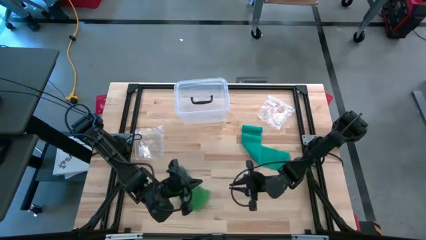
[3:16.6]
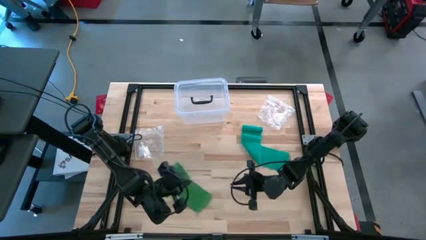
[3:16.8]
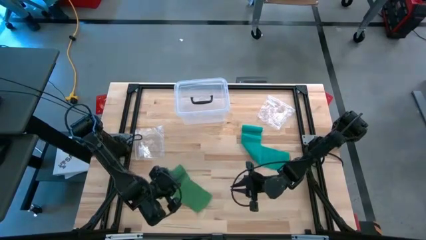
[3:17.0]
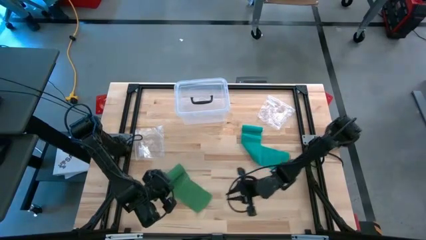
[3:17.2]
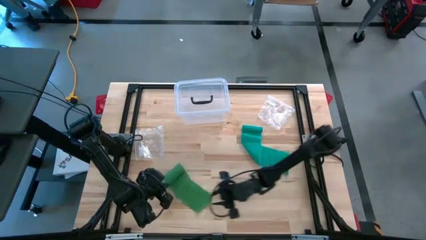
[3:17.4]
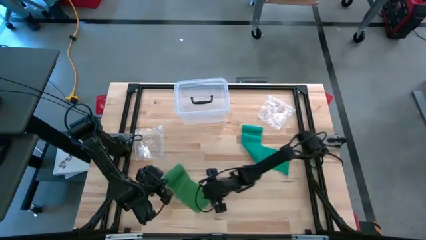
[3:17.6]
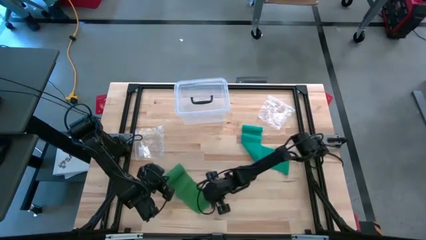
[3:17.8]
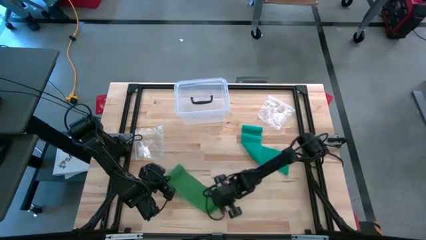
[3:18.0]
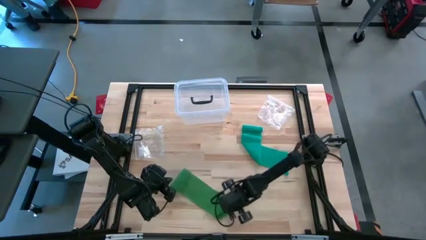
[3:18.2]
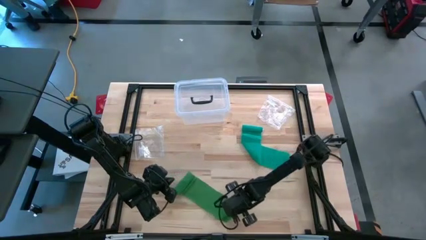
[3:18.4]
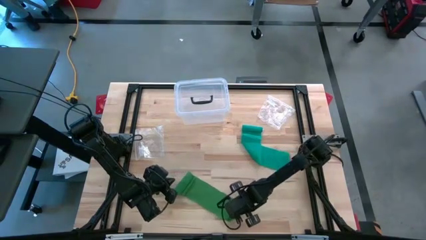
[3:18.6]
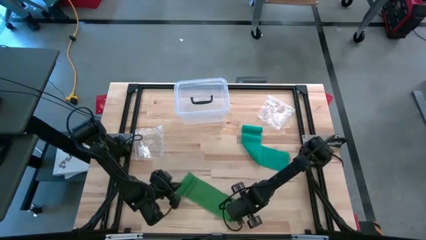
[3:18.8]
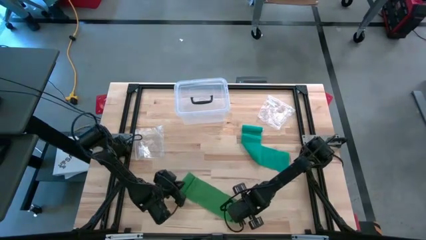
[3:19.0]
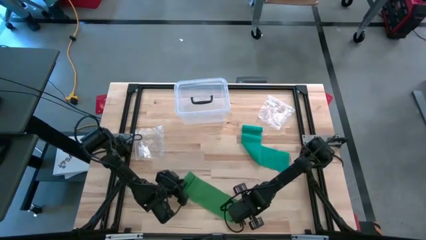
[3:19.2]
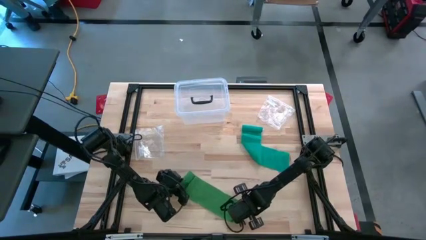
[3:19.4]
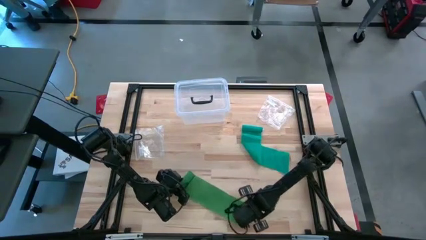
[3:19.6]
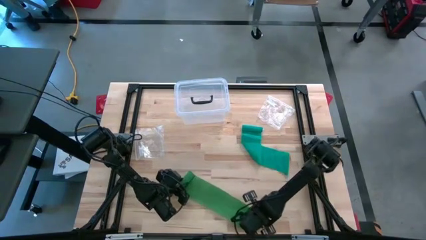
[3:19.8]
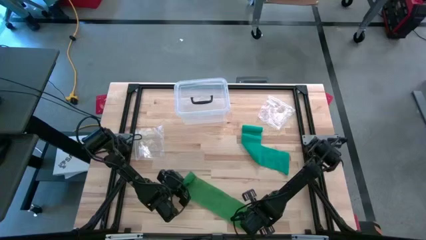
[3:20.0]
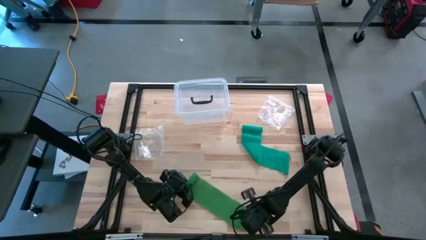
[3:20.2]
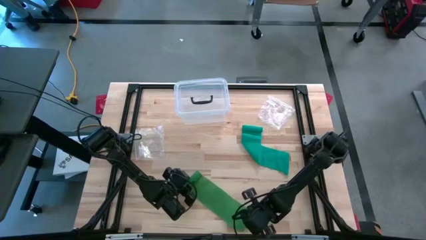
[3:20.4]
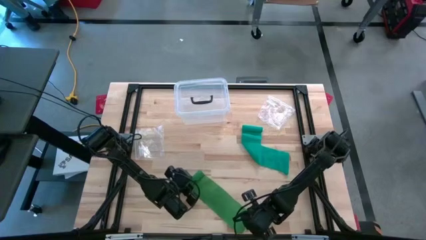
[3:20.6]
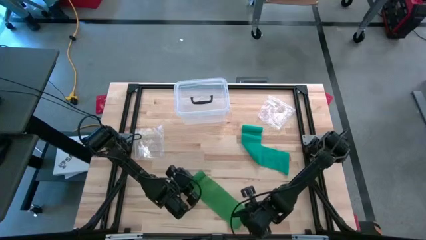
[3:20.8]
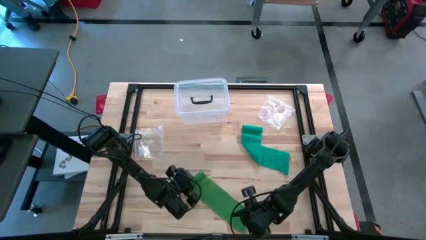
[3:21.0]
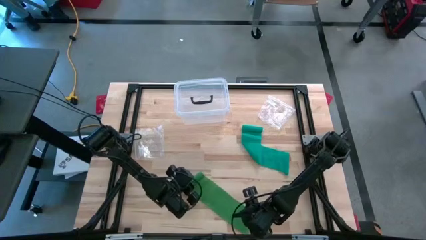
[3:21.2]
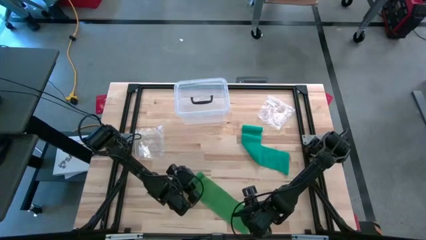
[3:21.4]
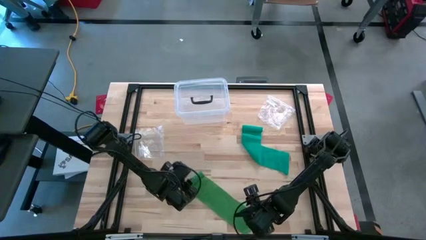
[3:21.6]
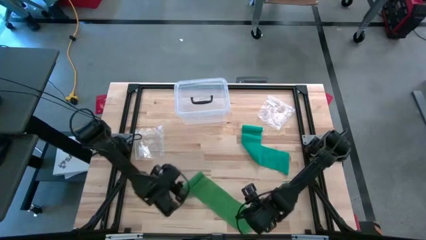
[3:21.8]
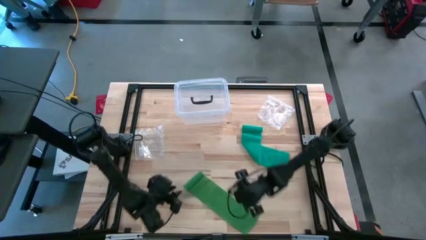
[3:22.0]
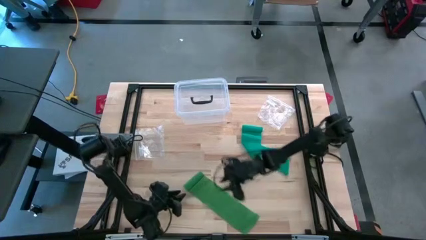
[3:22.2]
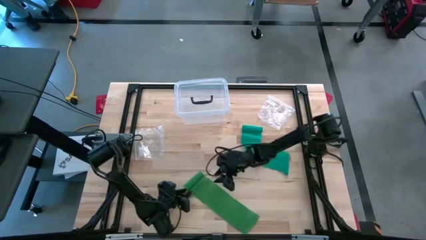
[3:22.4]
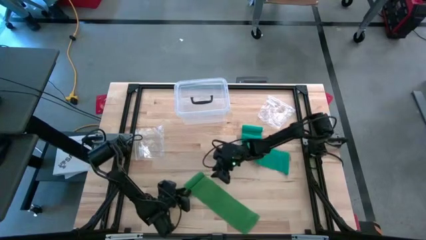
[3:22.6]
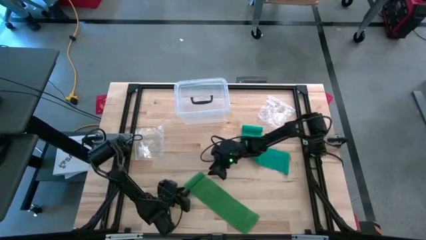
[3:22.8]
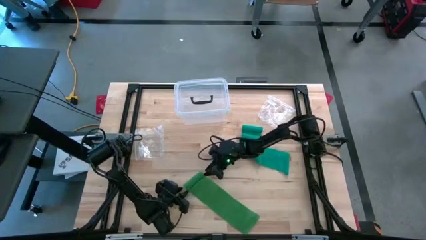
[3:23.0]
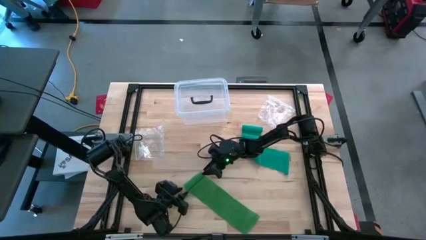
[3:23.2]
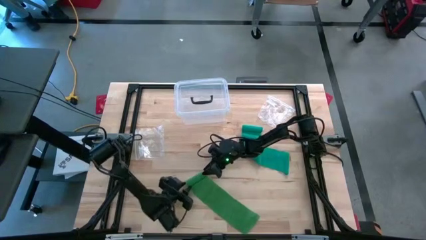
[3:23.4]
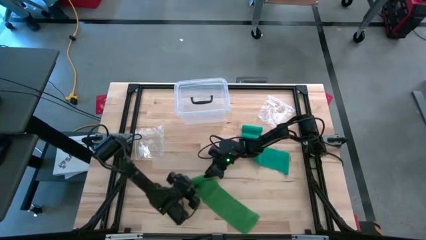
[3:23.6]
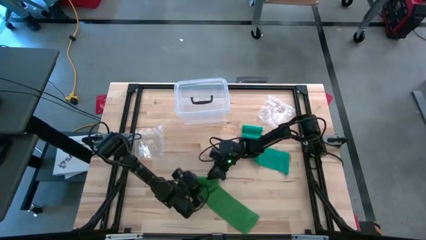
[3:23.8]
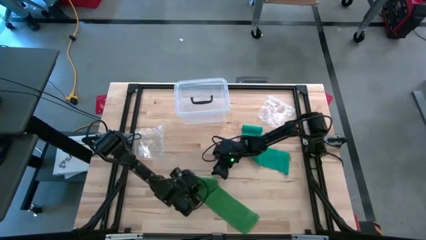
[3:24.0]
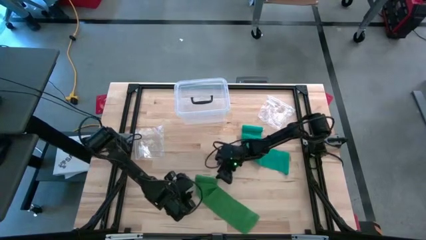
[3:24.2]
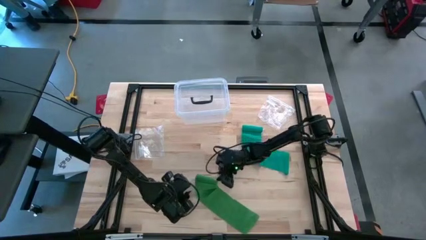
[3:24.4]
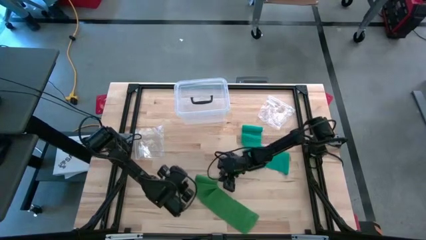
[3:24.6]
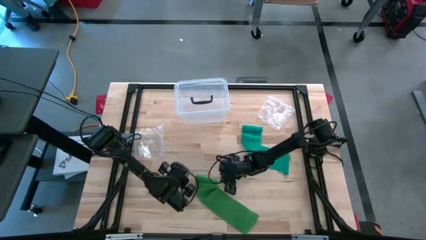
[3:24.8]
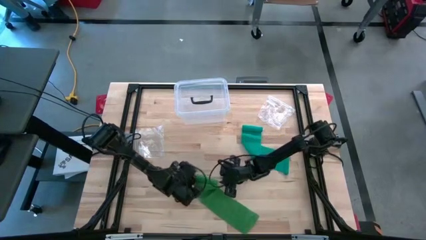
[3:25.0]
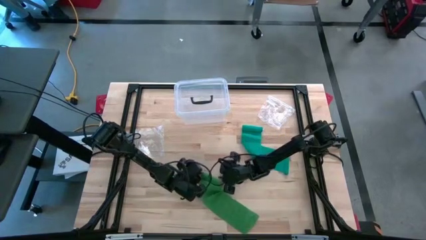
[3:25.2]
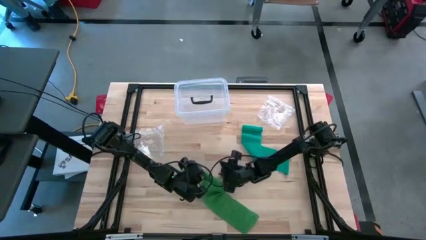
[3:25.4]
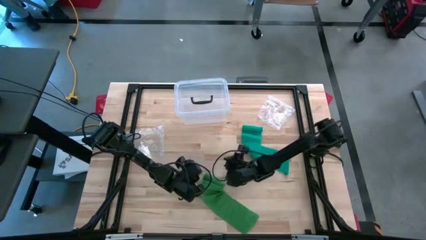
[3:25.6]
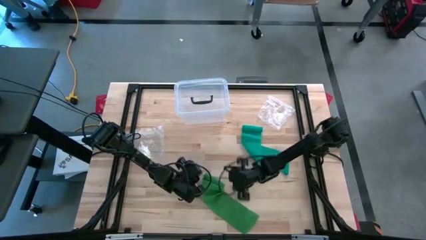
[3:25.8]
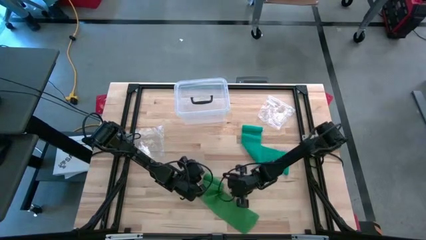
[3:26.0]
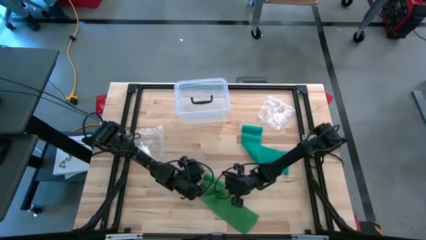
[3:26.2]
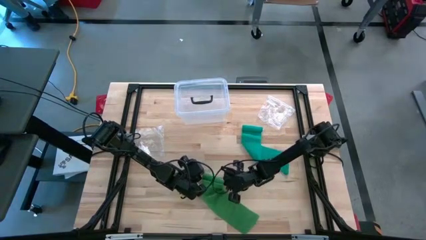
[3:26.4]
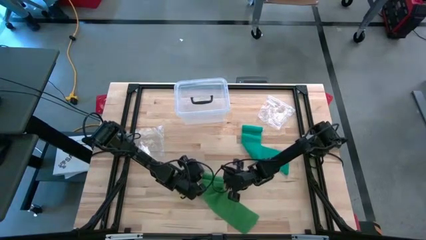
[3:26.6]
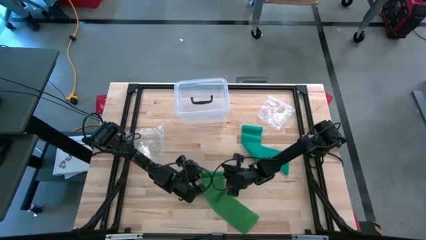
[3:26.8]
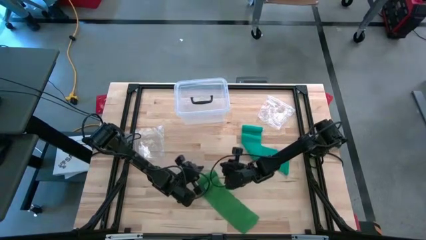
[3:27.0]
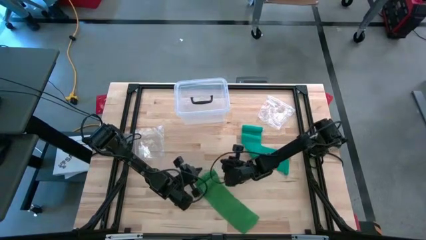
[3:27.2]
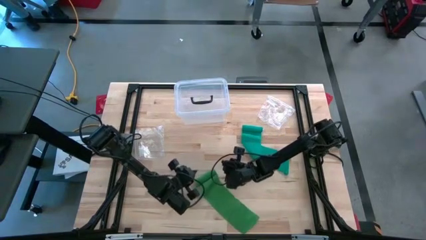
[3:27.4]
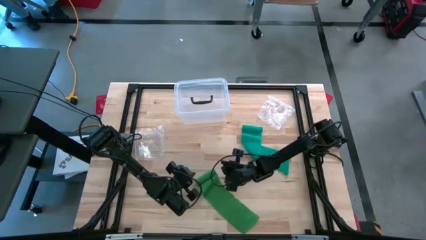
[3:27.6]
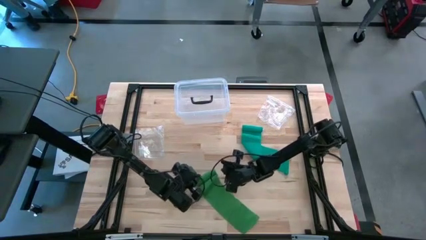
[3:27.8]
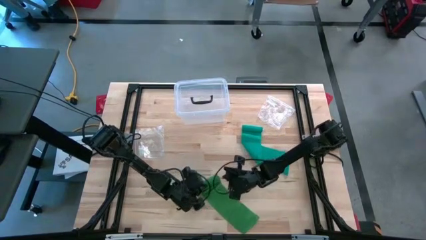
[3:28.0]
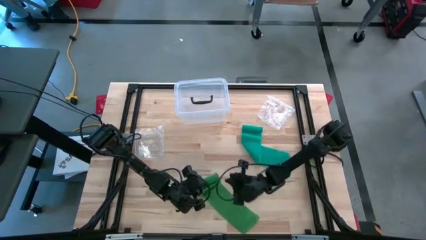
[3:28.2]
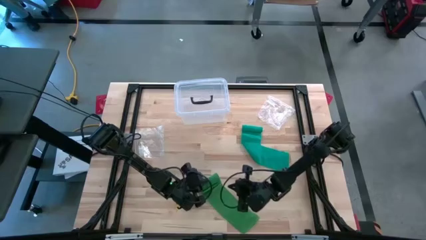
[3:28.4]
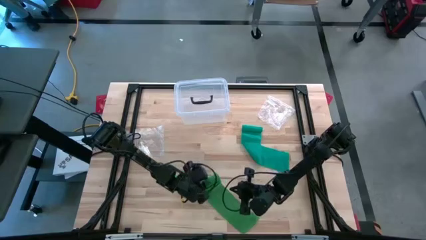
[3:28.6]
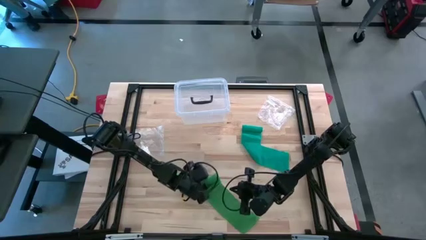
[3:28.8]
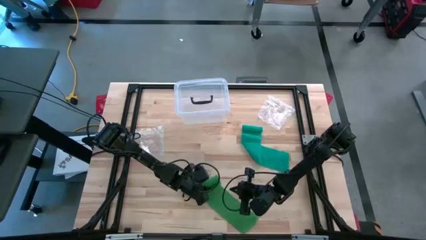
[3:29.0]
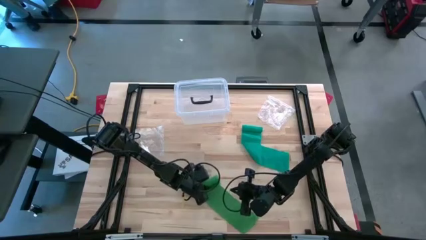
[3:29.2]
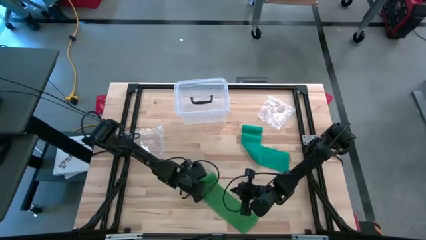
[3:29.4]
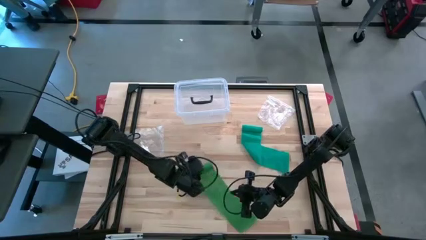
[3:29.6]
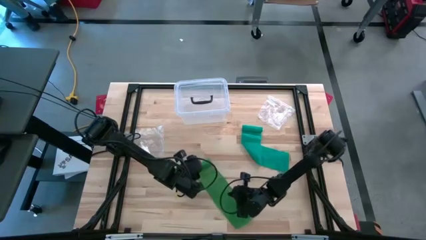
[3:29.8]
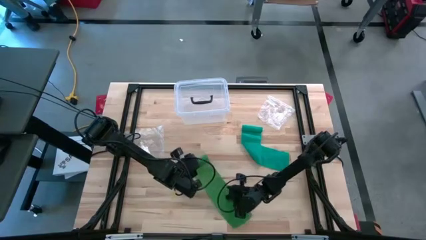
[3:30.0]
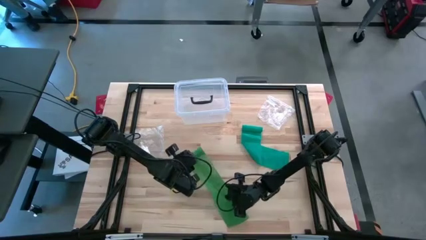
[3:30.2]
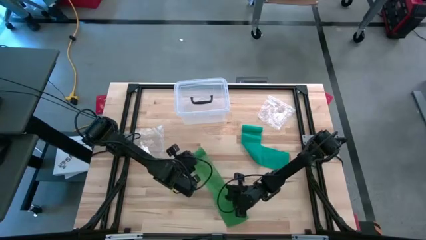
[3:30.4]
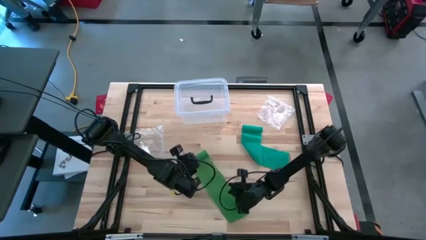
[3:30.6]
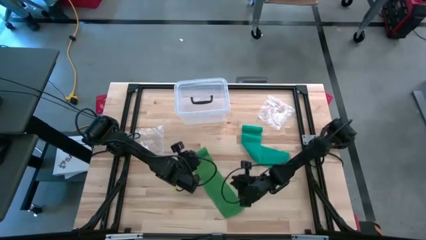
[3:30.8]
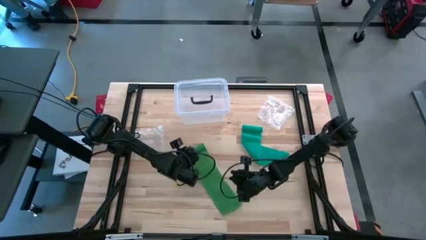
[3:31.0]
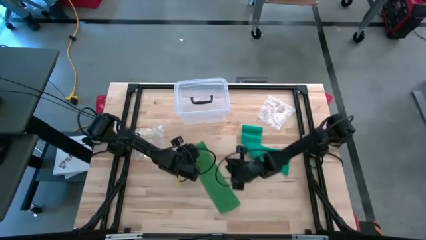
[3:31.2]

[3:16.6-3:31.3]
Task: Roll bandage
Roll the green bandage
